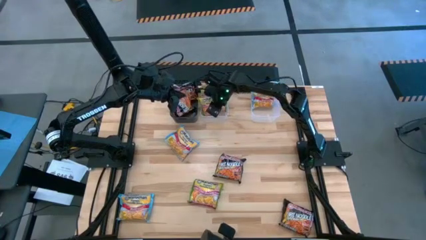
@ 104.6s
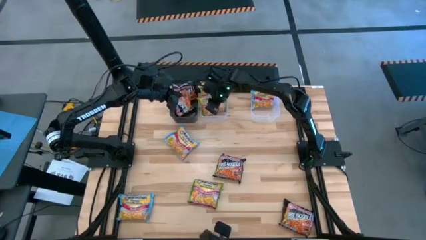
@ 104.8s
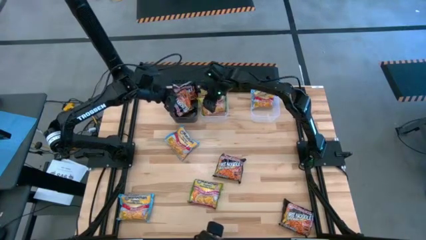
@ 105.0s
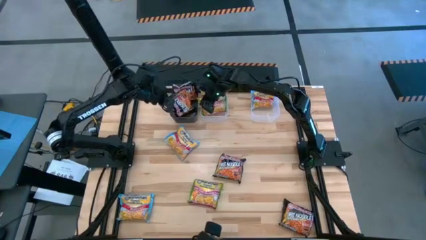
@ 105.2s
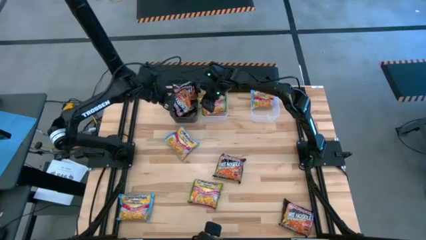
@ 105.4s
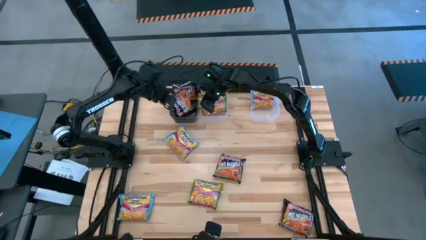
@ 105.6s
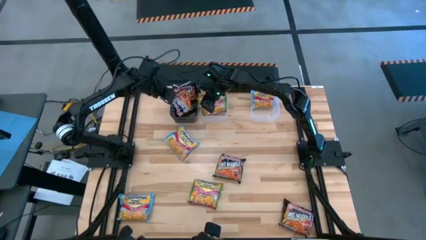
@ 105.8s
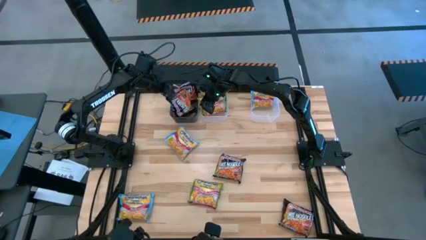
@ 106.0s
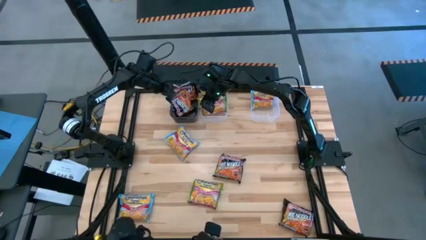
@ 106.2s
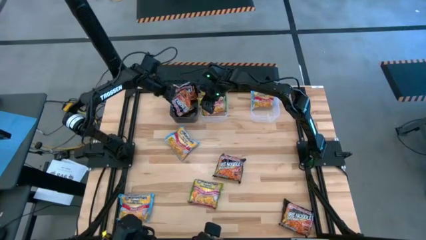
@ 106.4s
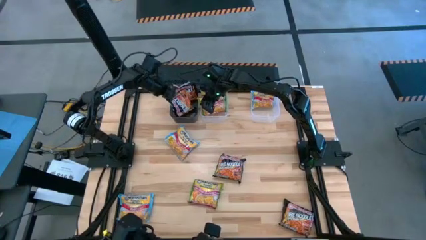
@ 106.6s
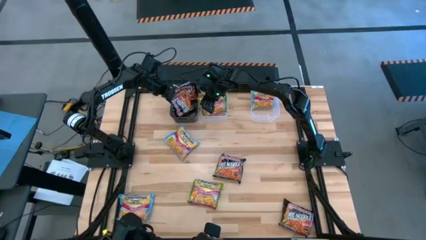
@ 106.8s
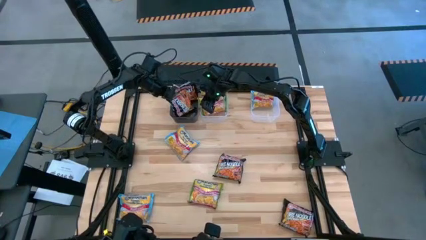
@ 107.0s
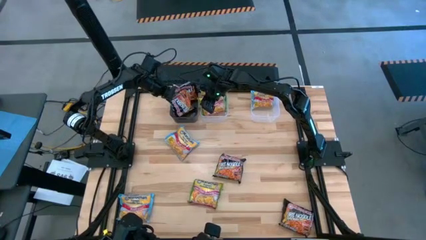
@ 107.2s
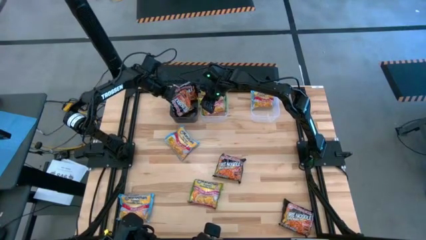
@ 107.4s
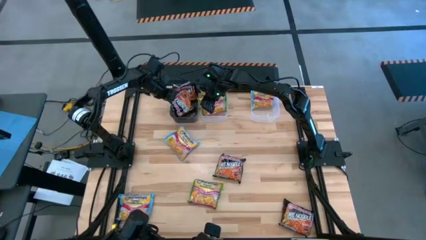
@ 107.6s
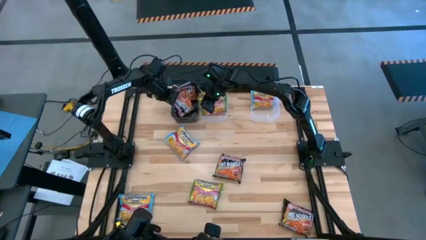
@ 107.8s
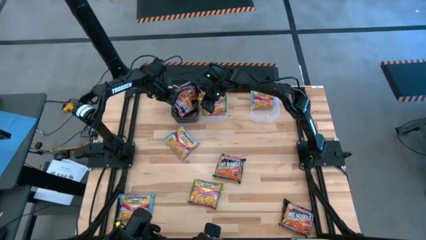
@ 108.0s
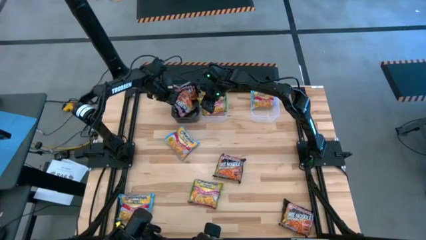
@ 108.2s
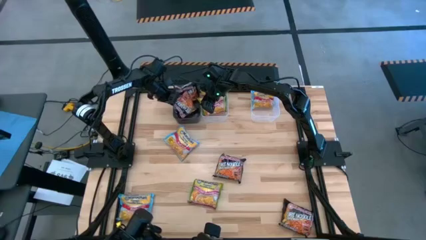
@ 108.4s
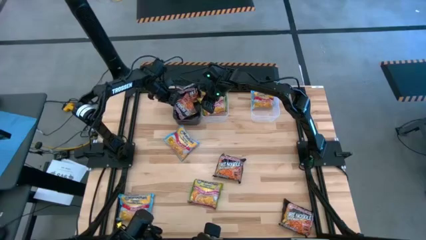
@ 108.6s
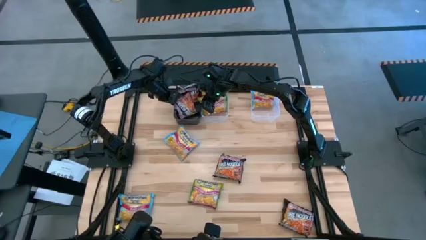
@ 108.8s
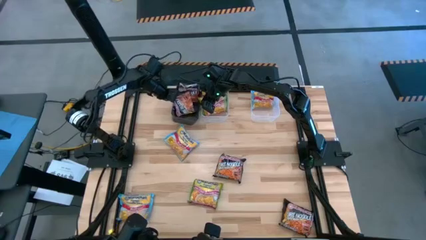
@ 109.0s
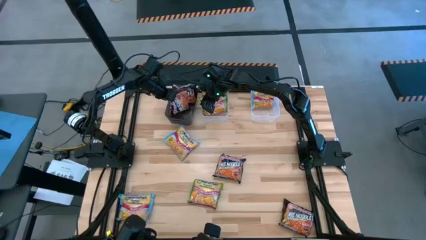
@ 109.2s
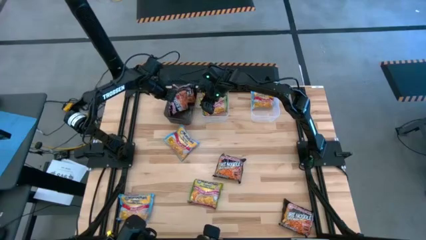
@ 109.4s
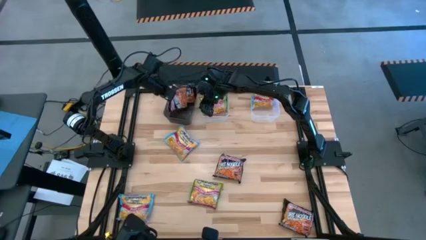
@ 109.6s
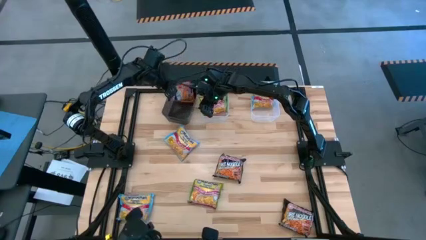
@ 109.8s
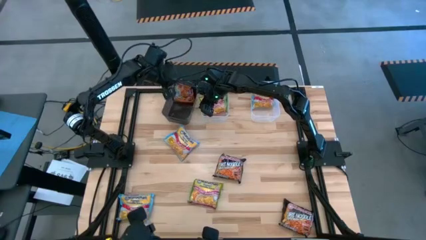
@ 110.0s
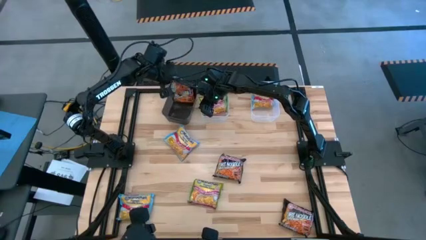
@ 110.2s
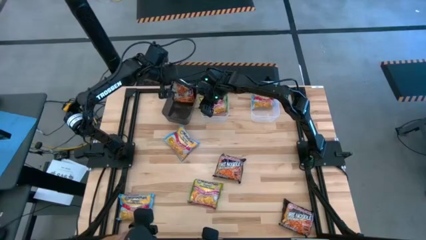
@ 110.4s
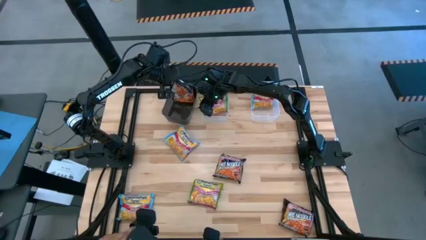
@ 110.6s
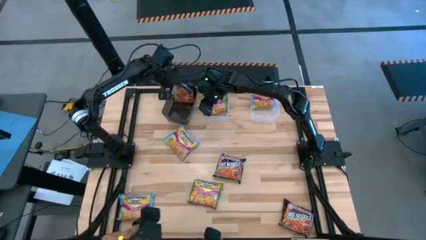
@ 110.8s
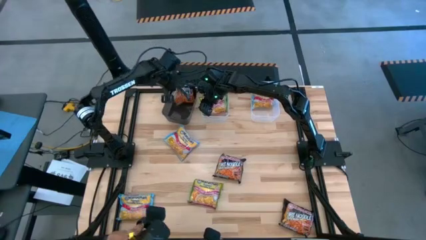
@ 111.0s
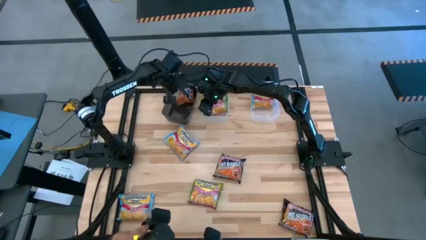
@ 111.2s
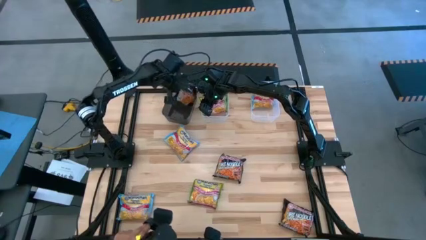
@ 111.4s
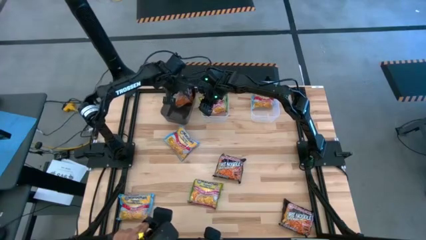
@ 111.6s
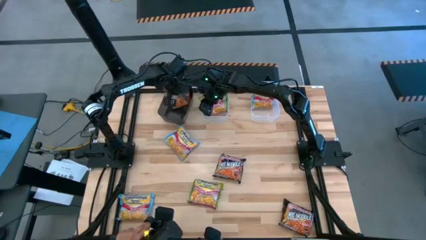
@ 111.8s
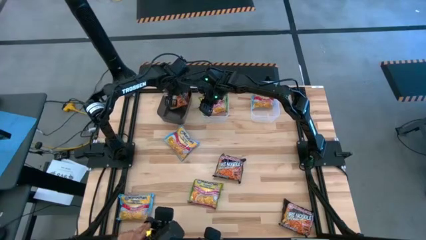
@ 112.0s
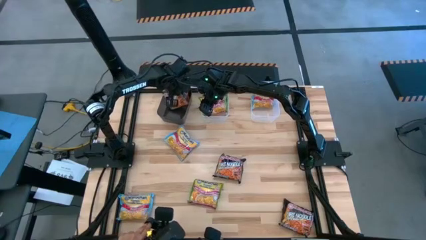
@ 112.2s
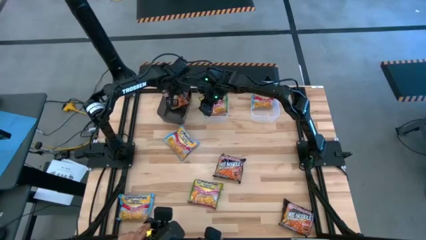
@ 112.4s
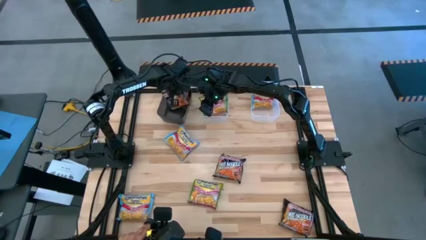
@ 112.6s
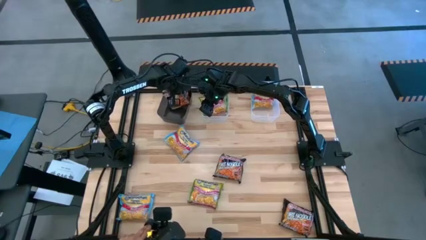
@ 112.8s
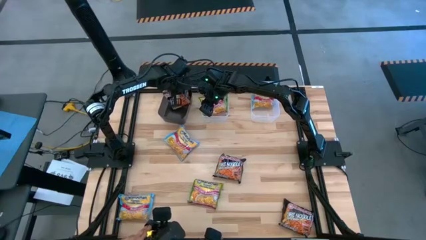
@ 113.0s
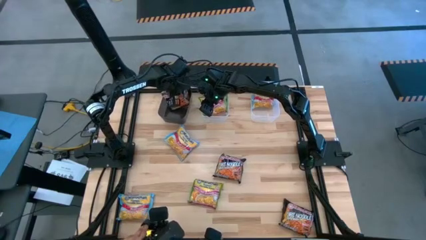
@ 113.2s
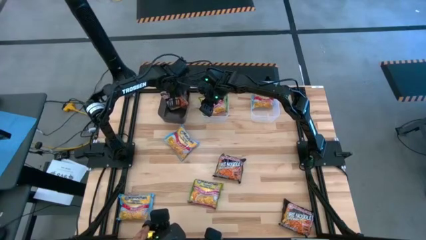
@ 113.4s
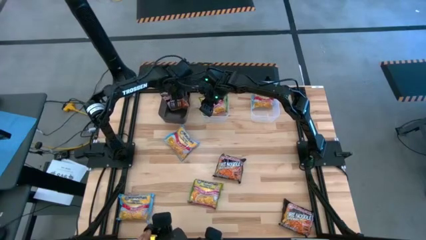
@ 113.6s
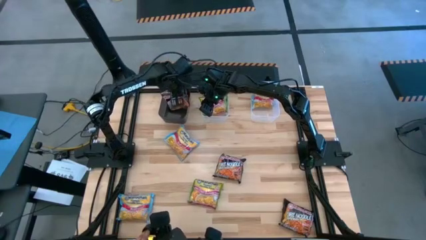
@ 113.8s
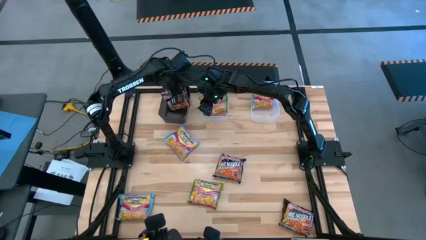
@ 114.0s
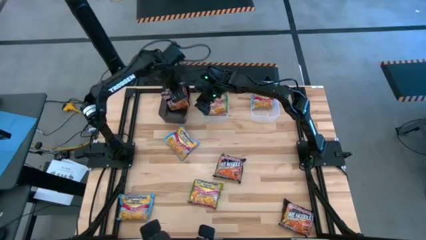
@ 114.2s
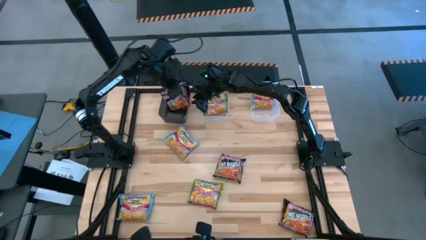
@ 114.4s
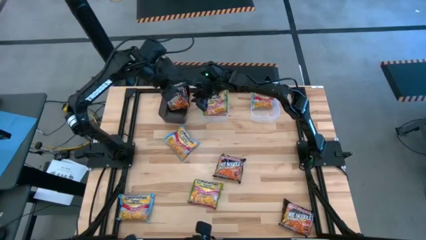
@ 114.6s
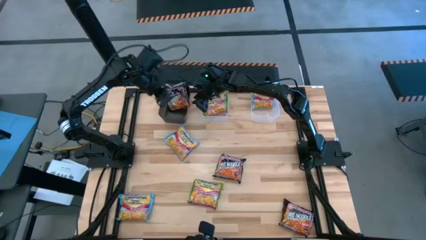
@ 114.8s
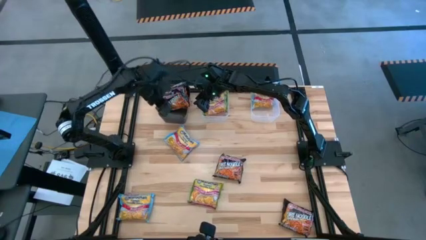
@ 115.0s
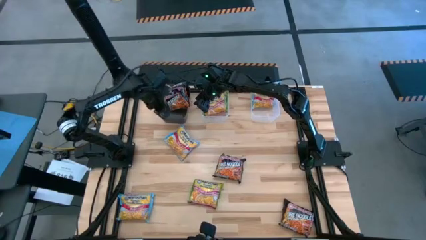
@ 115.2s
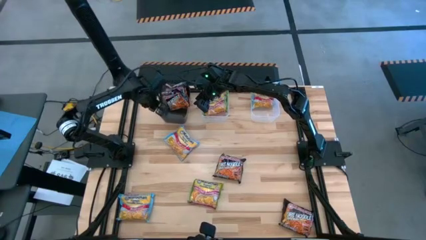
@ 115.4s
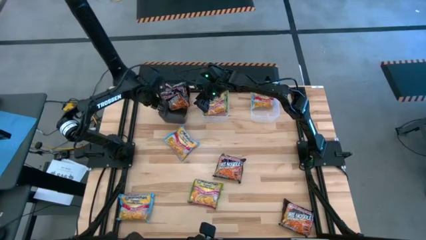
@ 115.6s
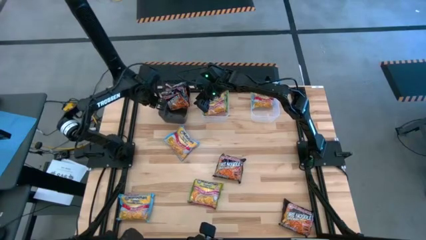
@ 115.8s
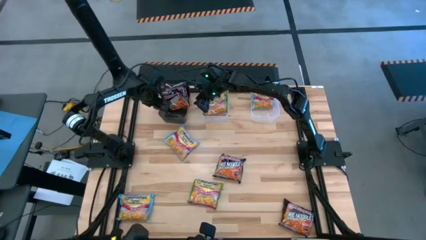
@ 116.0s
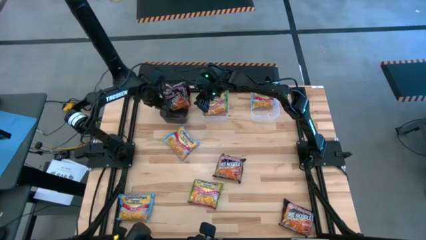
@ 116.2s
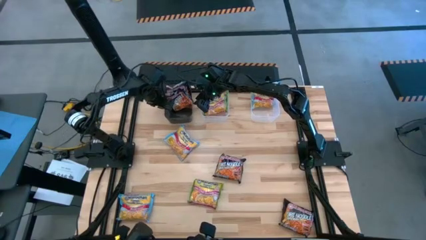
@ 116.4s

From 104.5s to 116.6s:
Task: Sort Maruchan noodles
Adjust the black noodle pack in the black bin

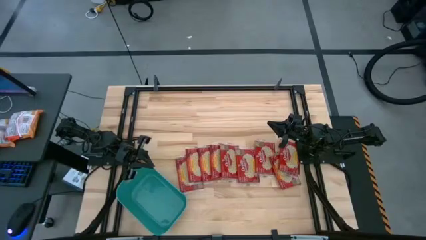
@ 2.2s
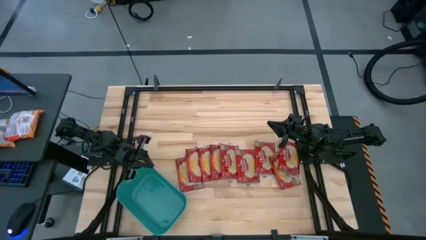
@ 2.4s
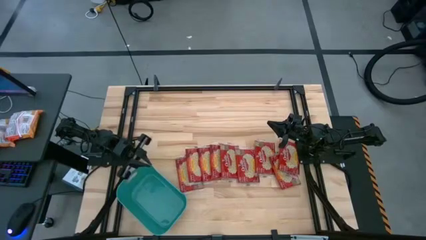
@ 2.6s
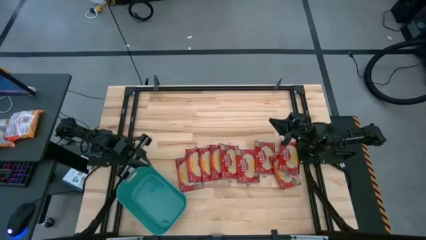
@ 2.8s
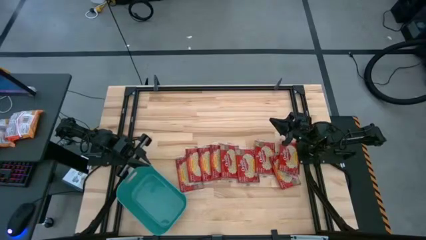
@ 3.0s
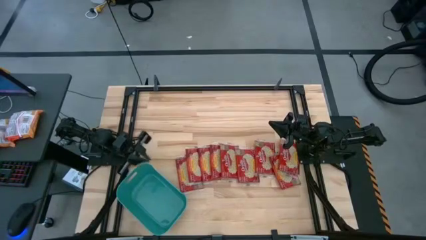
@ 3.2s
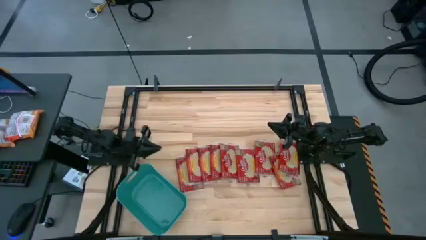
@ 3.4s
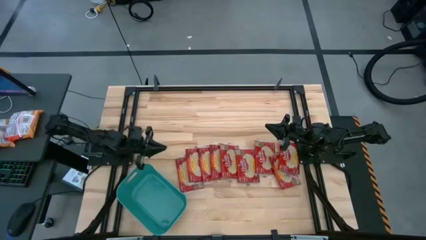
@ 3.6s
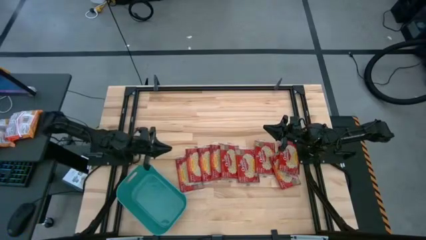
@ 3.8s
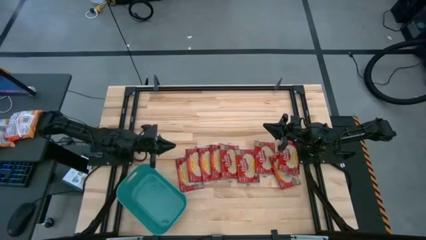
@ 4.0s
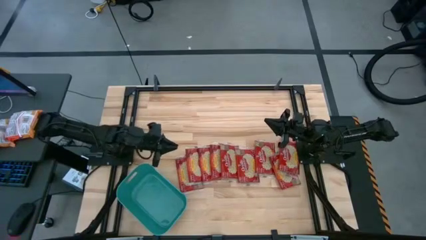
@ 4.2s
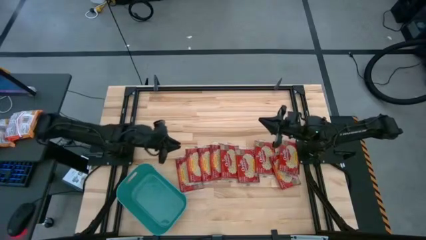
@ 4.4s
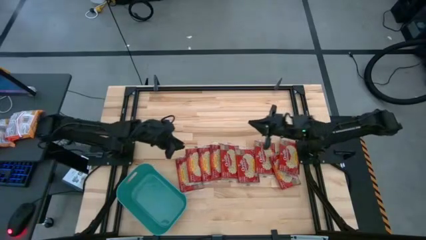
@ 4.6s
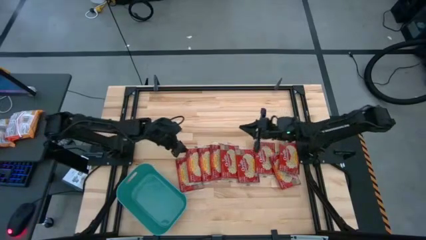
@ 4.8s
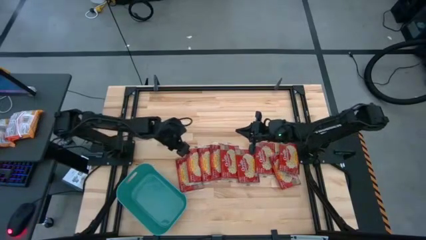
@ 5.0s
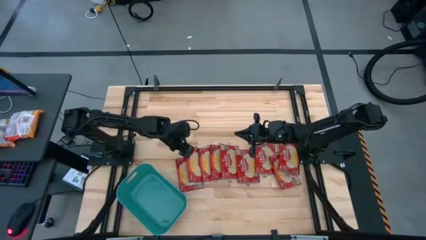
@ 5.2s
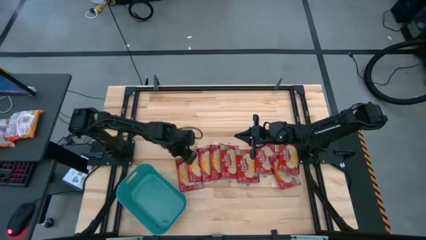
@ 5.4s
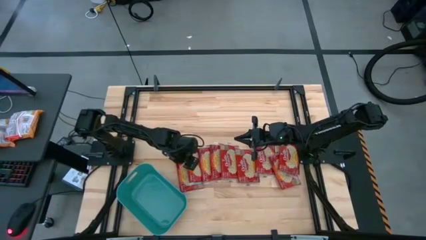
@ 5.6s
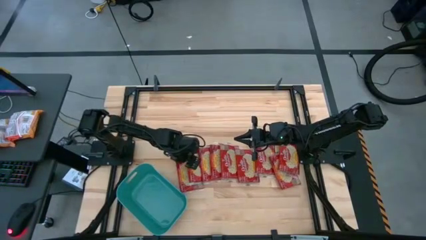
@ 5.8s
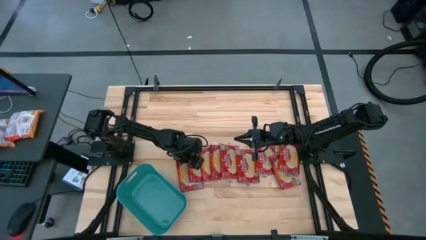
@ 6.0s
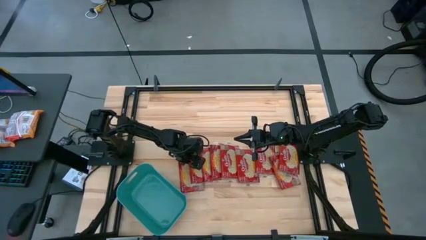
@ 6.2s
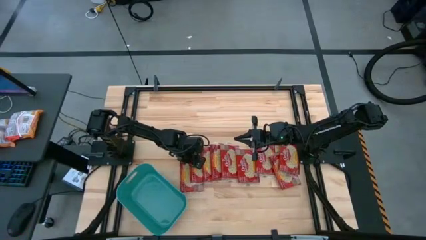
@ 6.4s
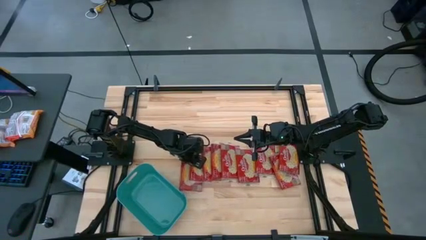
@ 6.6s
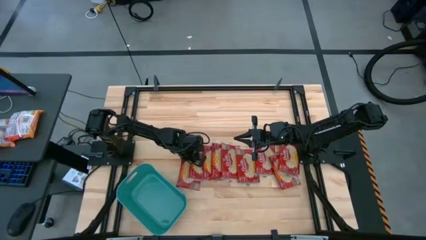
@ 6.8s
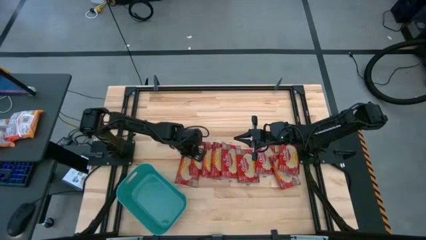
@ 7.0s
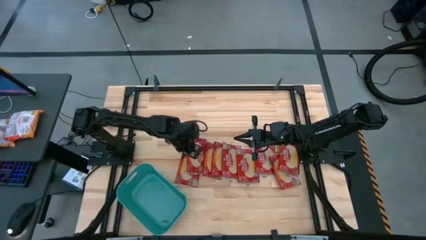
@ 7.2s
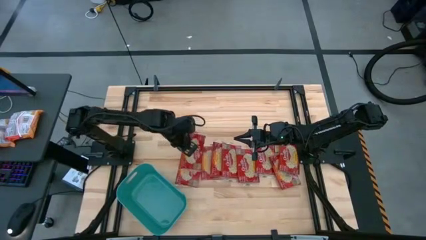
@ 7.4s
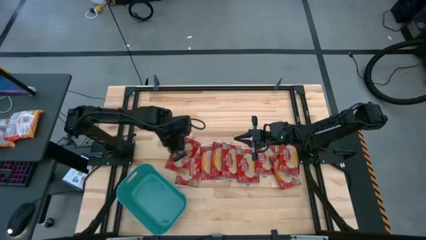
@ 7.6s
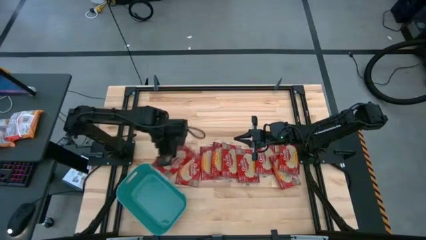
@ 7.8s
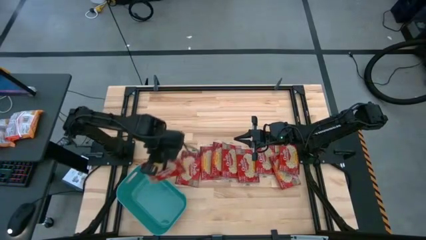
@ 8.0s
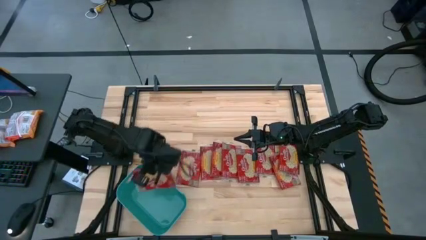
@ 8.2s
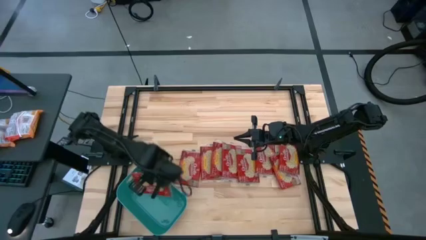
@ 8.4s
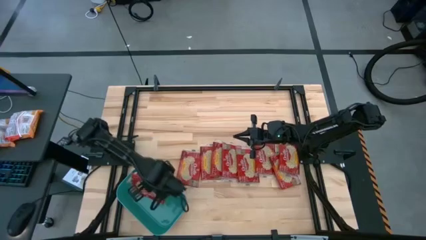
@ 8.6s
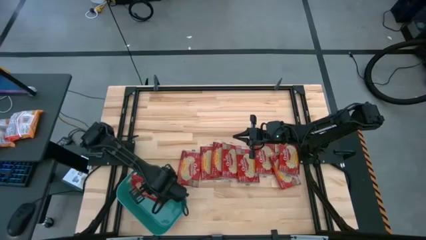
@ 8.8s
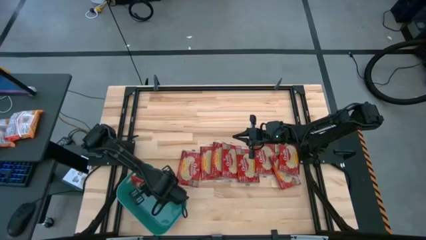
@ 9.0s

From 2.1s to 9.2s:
Task: Sort popcorn bags into baskets
Put the popcorn bag into the blue bin
